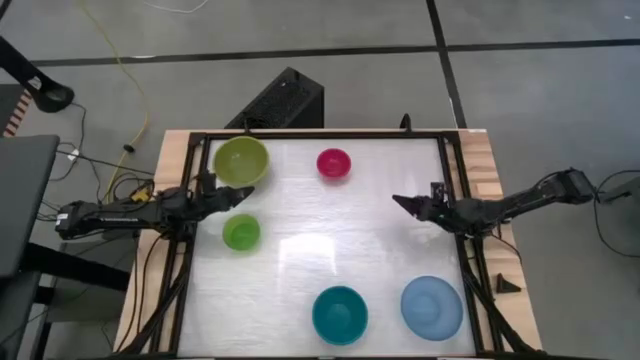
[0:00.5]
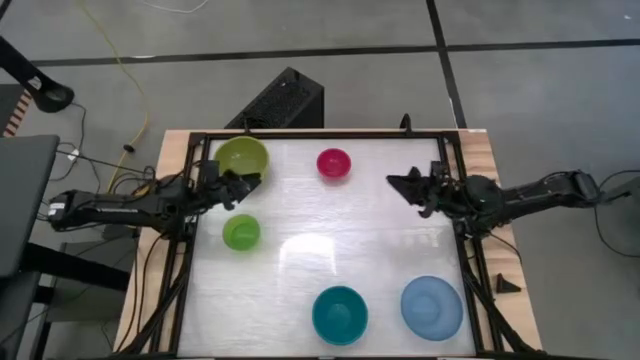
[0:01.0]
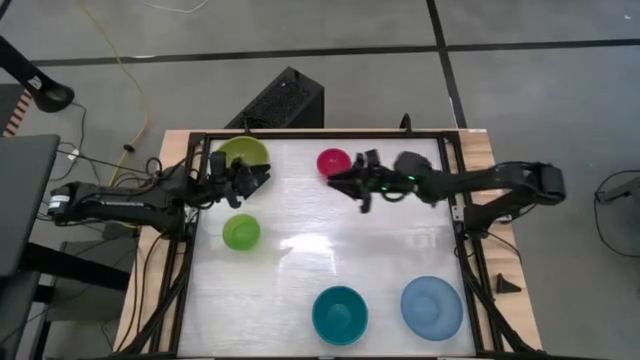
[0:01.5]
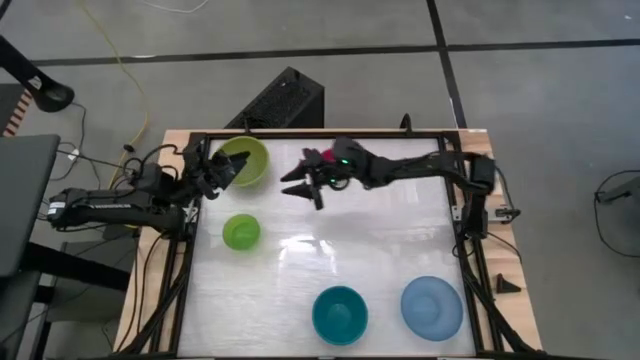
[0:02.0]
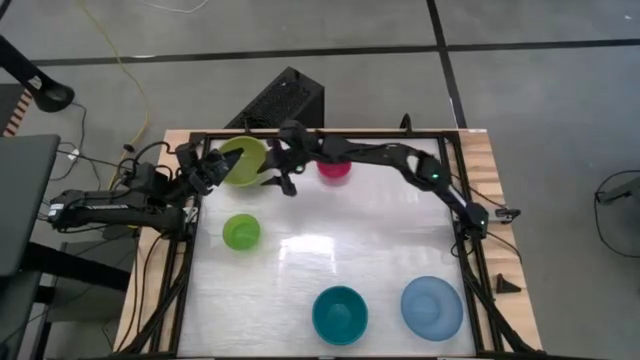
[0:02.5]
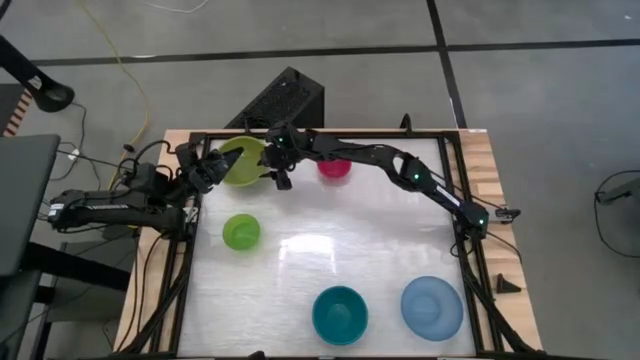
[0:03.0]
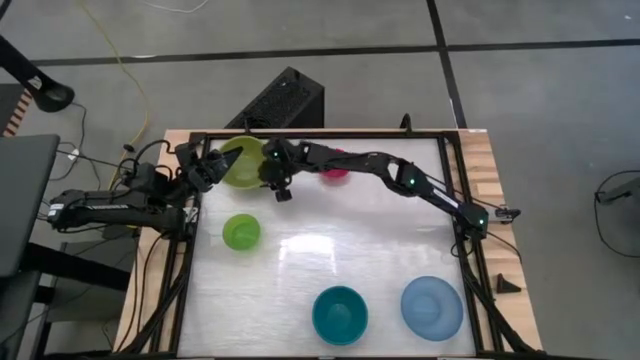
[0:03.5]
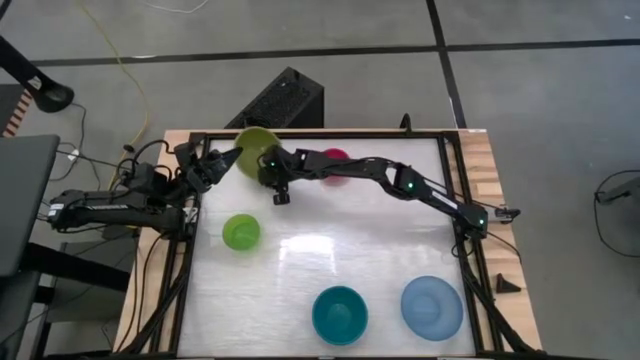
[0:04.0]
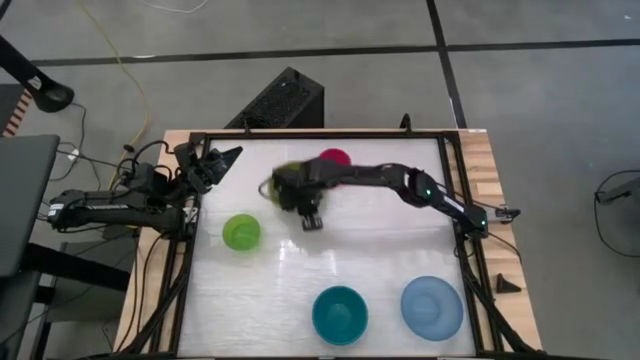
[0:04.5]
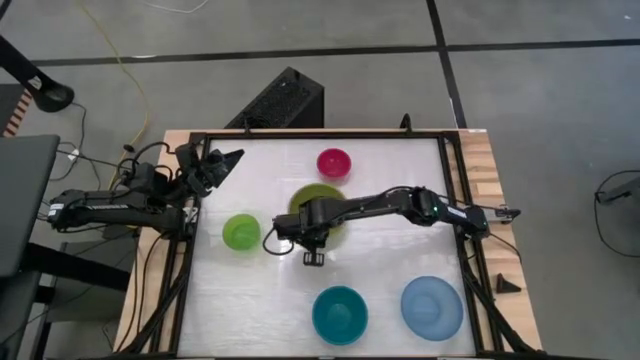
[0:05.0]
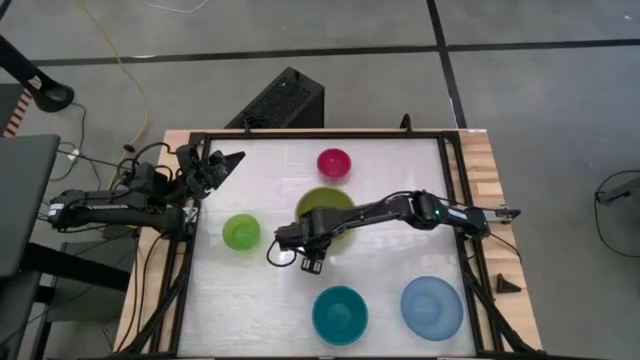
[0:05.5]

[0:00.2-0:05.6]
Move the dark green bowl to the center of the table

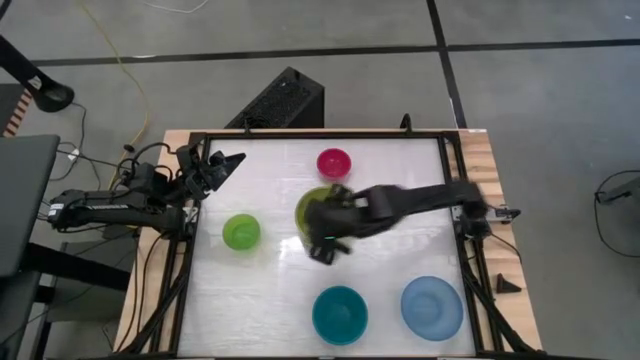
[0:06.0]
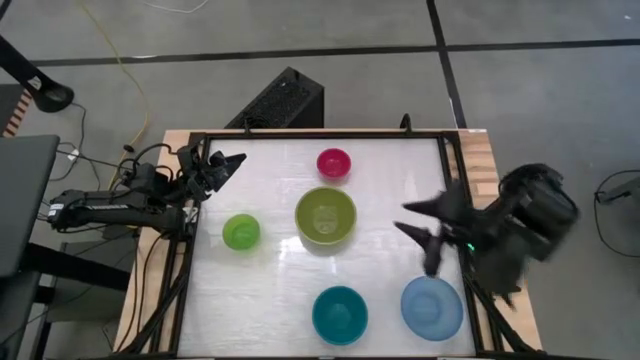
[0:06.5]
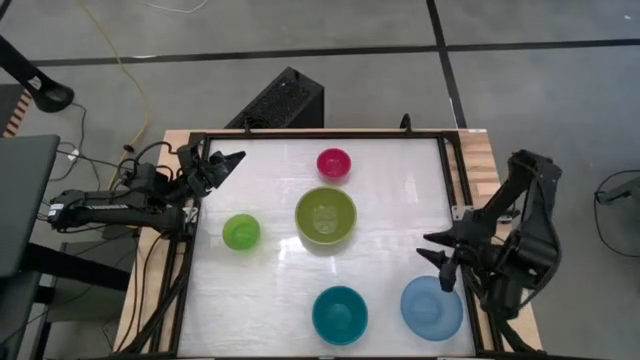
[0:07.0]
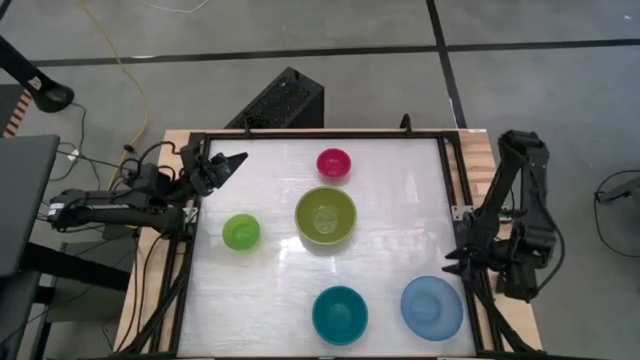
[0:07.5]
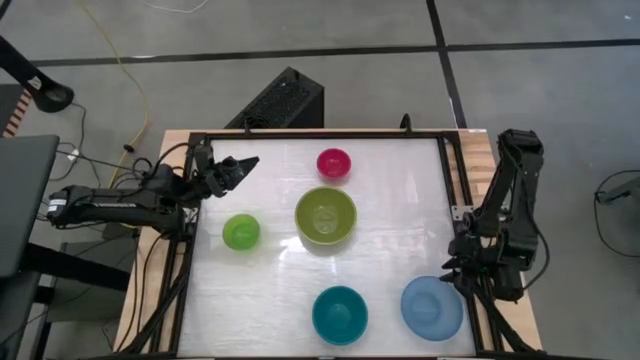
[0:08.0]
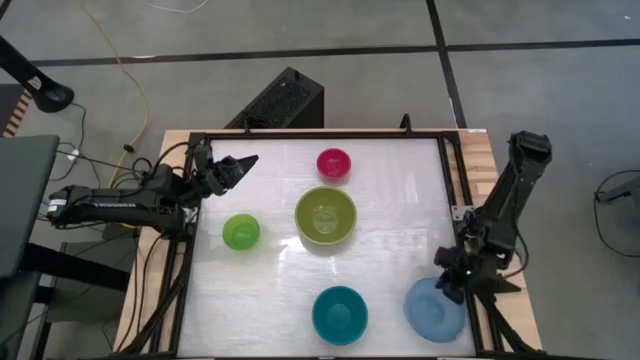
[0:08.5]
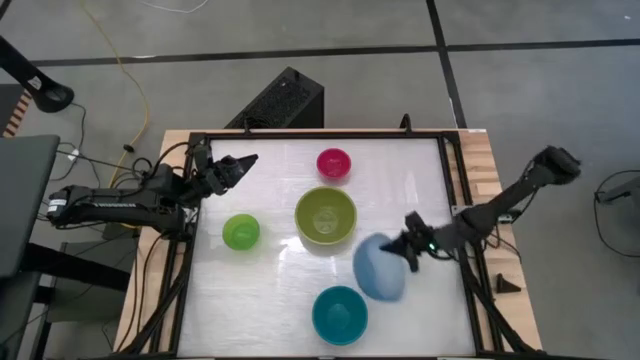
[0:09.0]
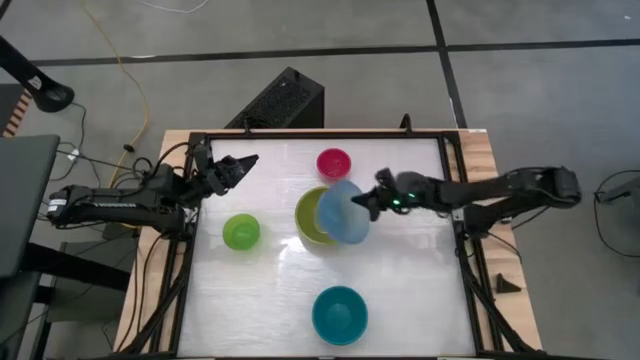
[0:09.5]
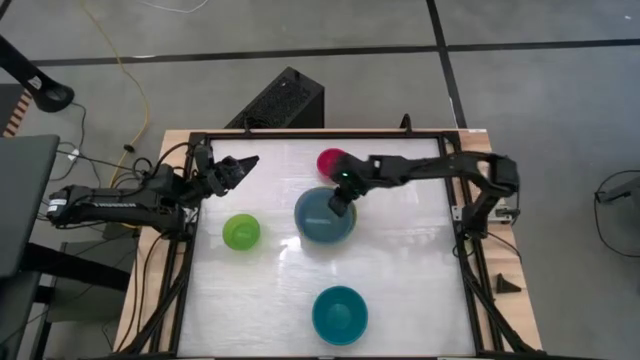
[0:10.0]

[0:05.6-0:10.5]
Stack the light blue bowl on top of the dark green bowl

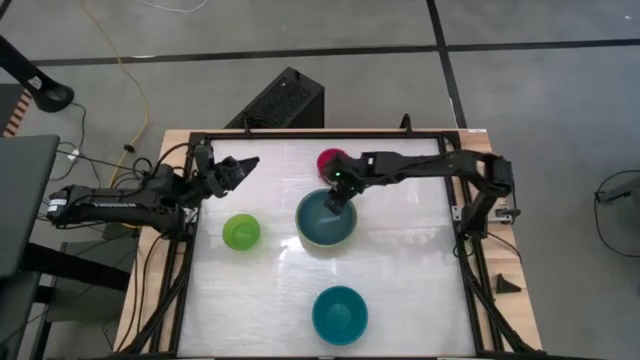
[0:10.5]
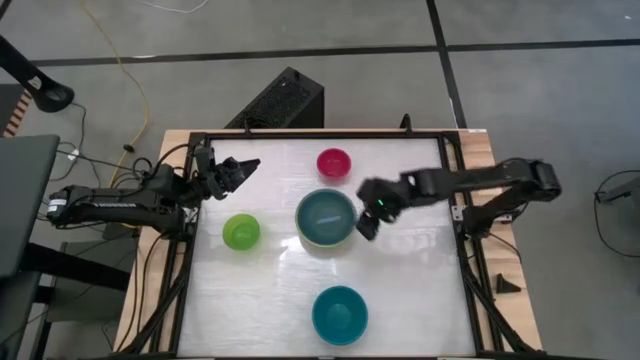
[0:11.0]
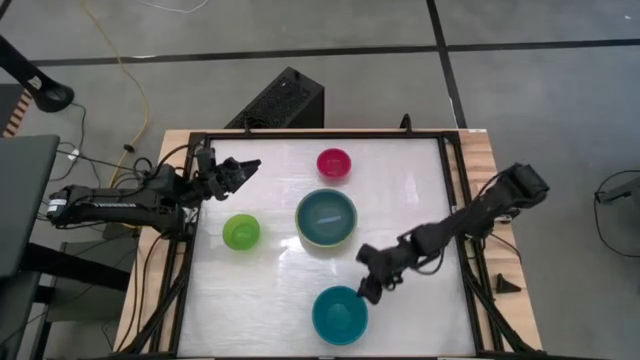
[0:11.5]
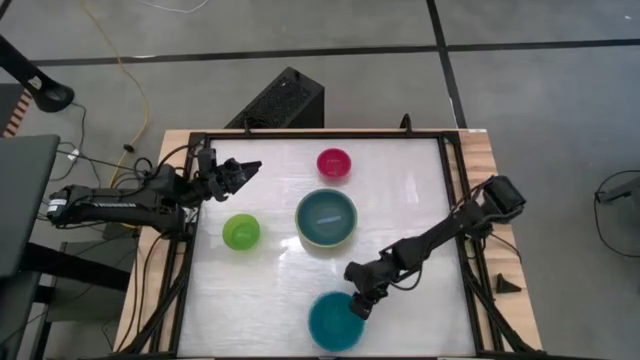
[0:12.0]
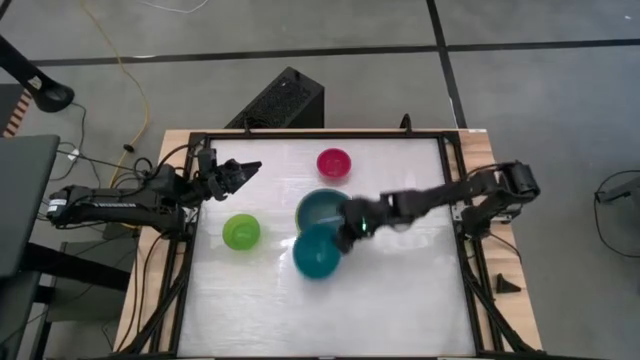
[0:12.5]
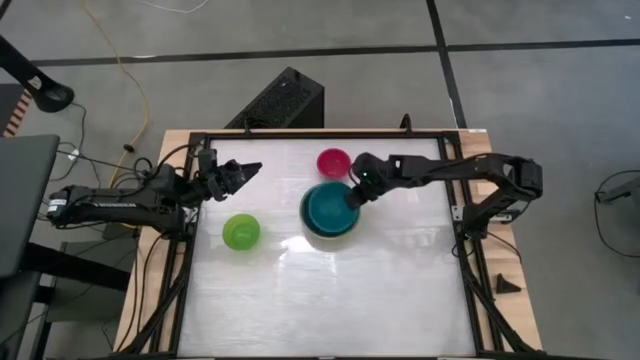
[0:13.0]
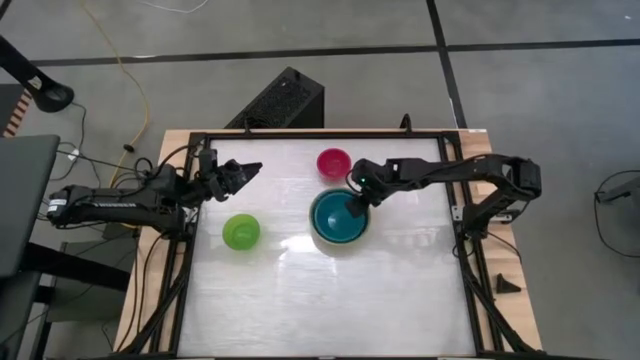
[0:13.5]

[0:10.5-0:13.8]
Stack the blue bowl on top of the light blue bowl

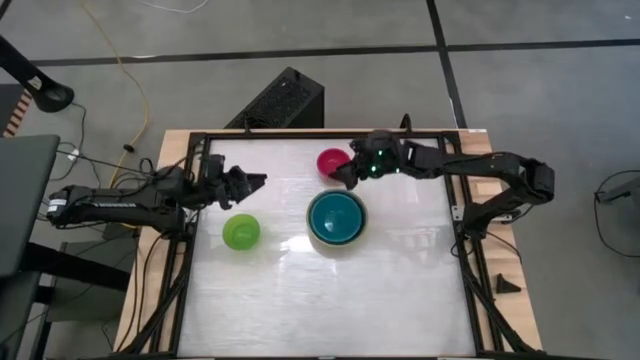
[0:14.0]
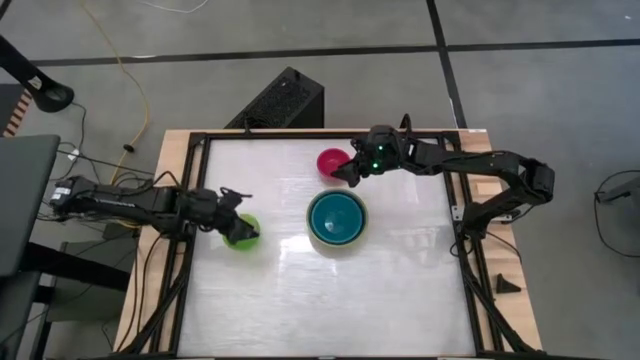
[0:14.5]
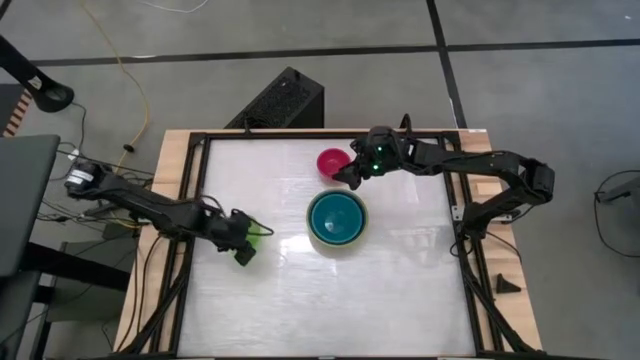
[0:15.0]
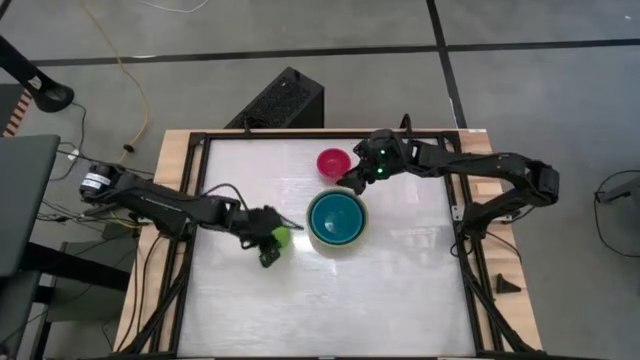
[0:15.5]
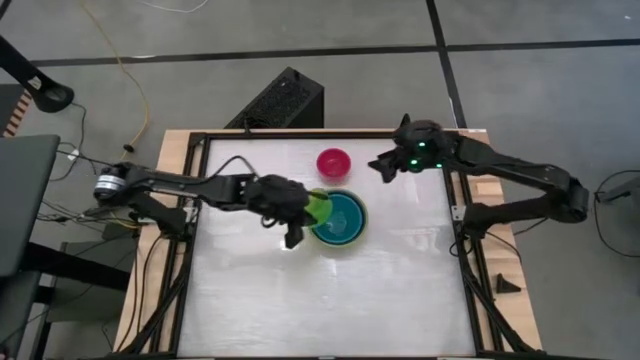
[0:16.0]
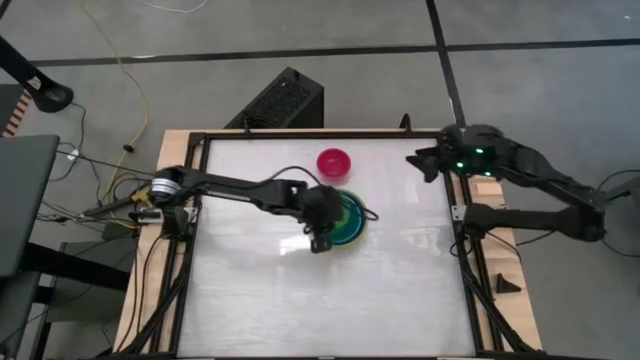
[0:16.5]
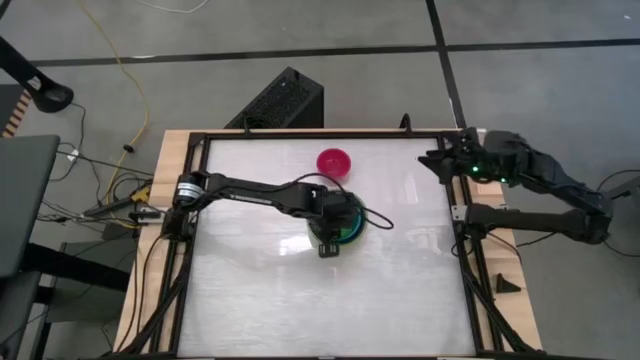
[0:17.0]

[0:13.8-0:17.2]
Stack the green bowl on top of the blue bowl

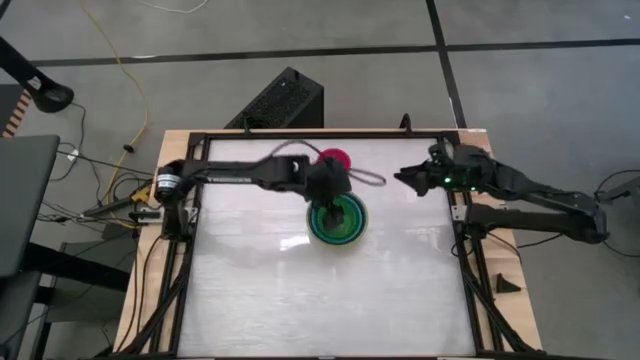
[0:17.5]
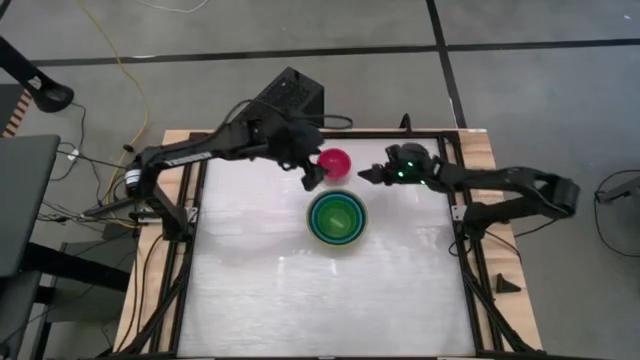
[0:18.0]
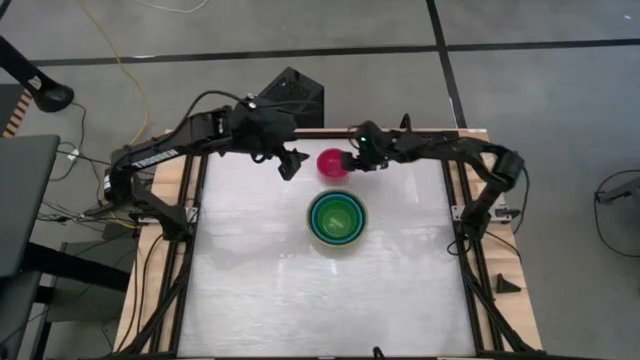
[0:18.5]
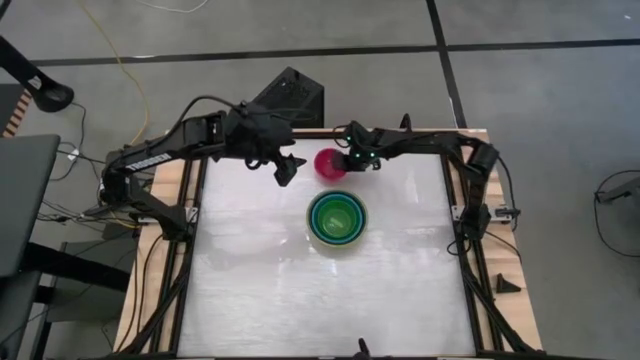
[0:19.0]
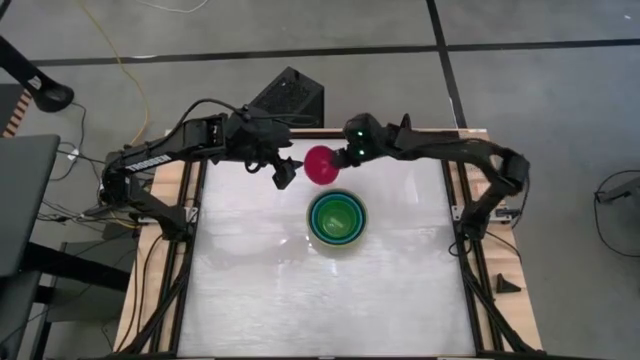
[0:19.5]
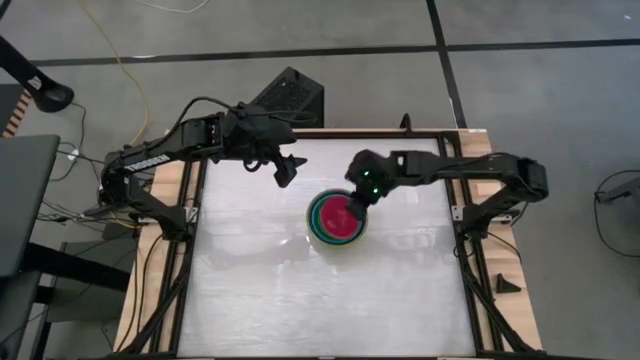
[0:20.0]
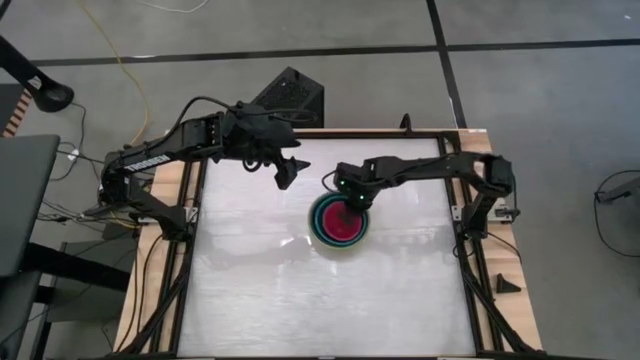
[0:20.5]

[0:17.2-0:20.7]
Stack the red bowl on top of the green bowl

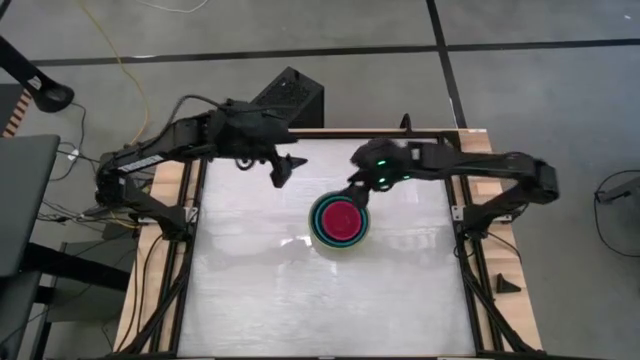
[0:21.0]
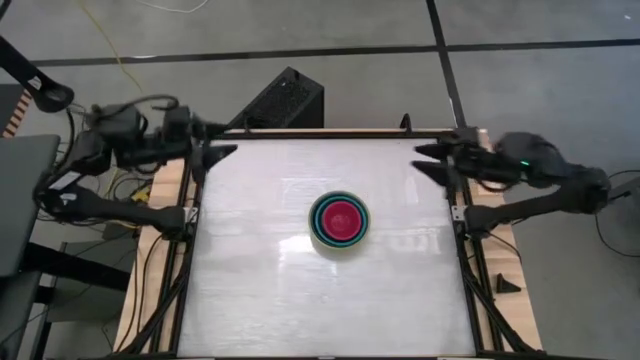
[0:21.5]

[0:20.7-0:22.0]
Return to Home Position
